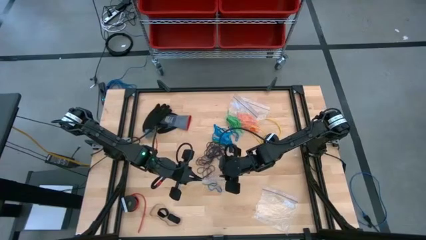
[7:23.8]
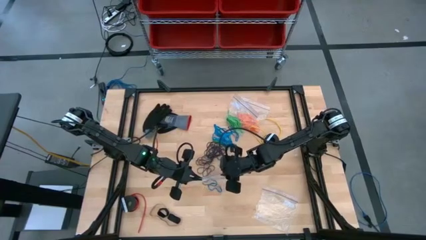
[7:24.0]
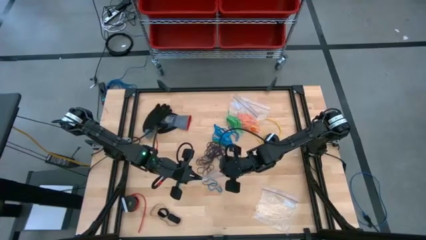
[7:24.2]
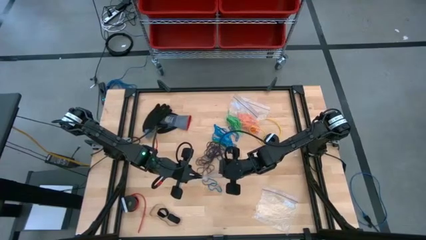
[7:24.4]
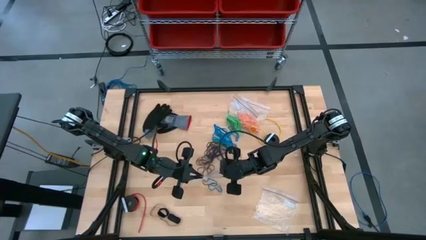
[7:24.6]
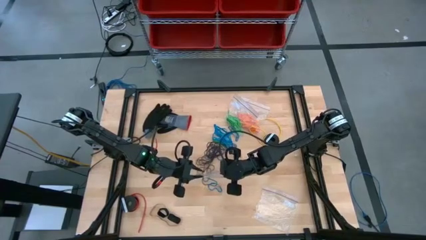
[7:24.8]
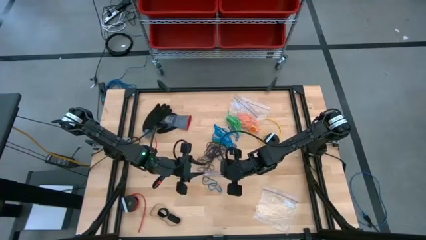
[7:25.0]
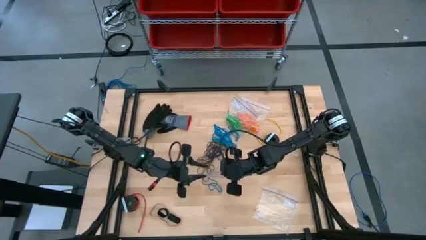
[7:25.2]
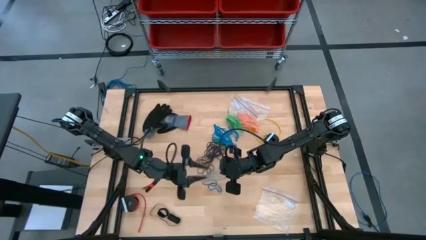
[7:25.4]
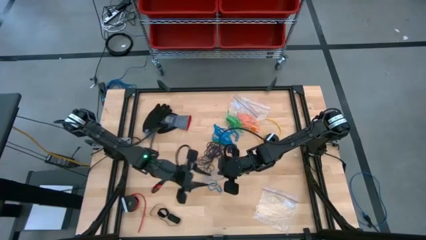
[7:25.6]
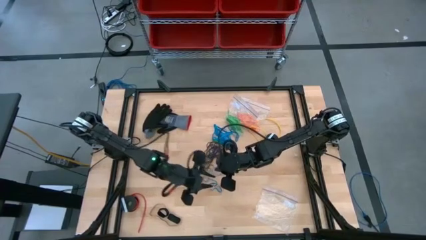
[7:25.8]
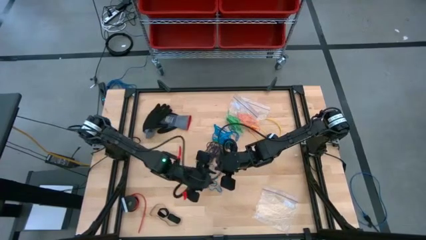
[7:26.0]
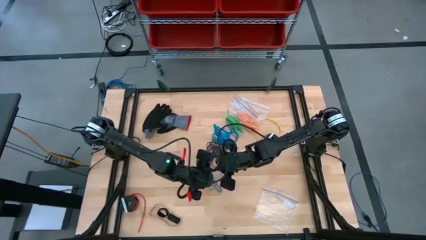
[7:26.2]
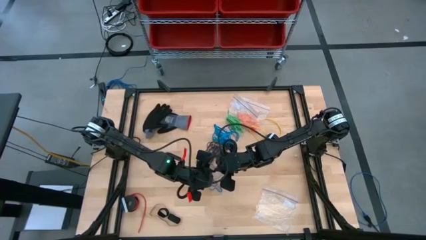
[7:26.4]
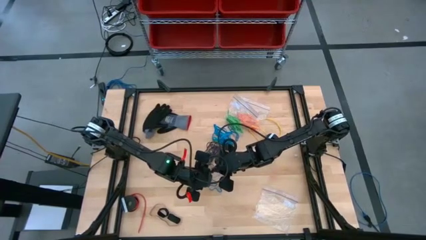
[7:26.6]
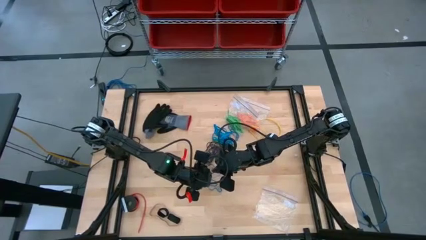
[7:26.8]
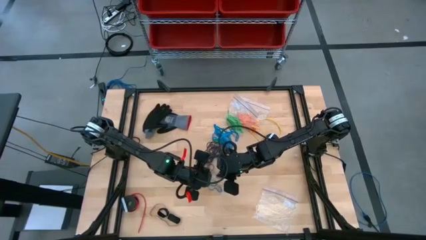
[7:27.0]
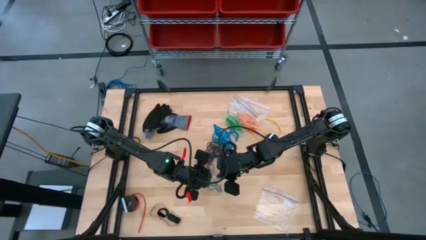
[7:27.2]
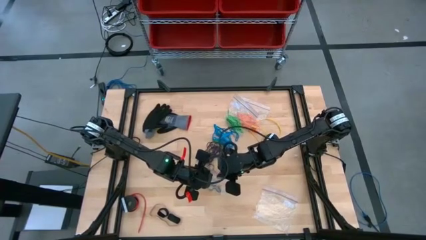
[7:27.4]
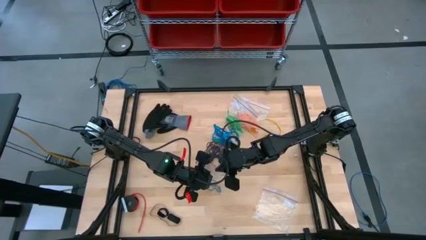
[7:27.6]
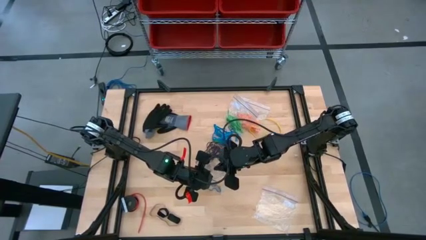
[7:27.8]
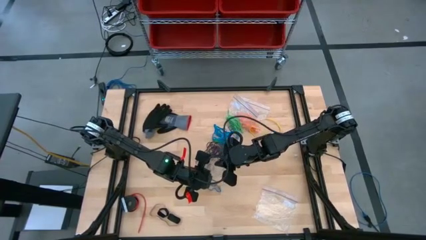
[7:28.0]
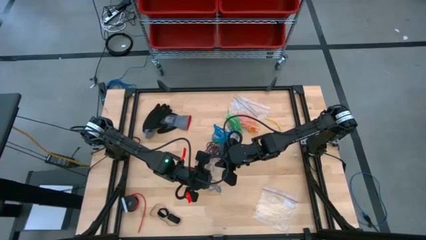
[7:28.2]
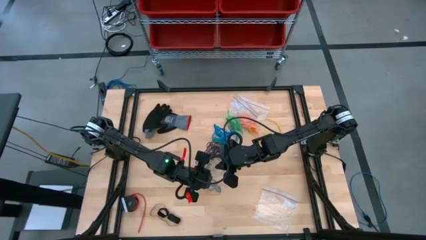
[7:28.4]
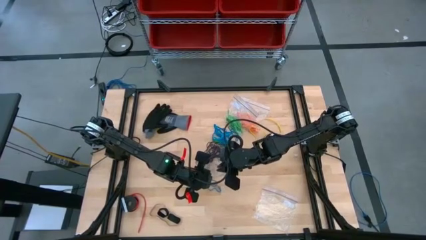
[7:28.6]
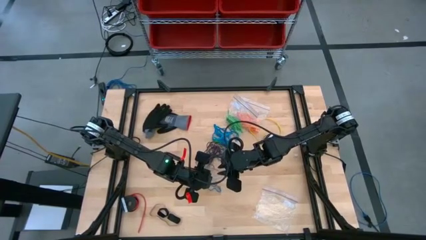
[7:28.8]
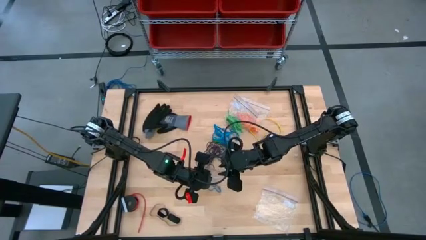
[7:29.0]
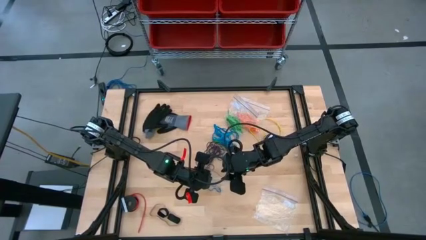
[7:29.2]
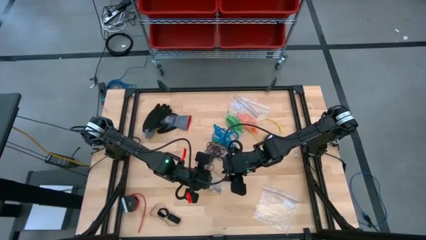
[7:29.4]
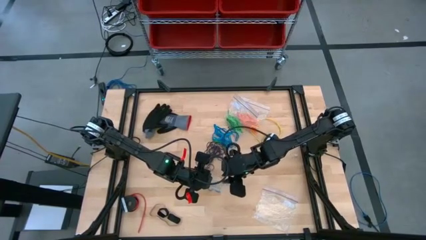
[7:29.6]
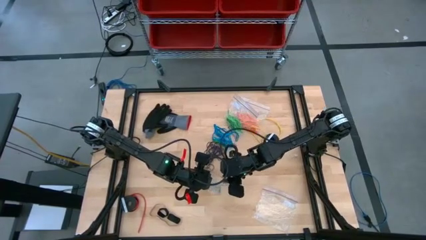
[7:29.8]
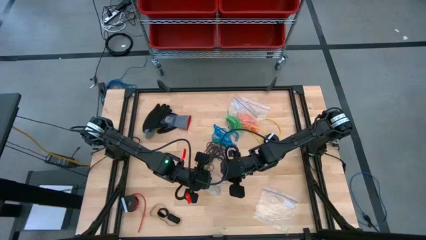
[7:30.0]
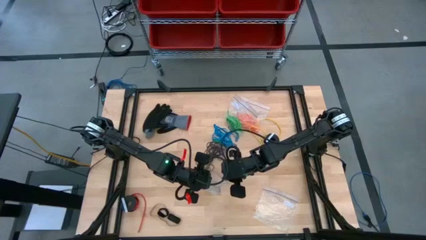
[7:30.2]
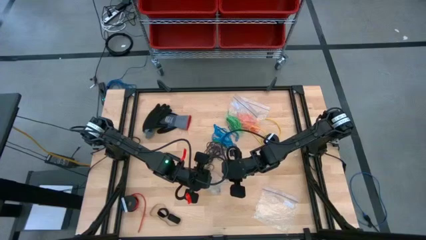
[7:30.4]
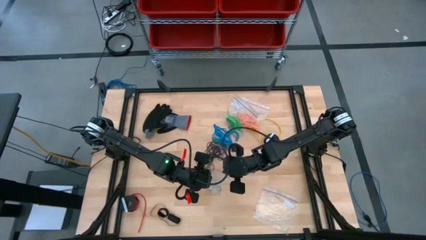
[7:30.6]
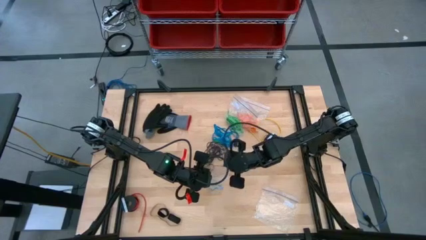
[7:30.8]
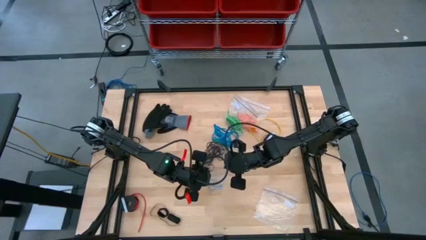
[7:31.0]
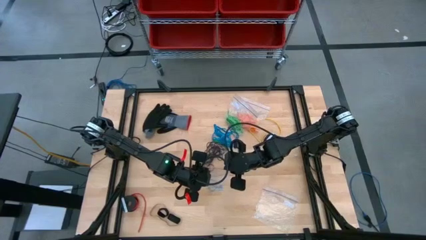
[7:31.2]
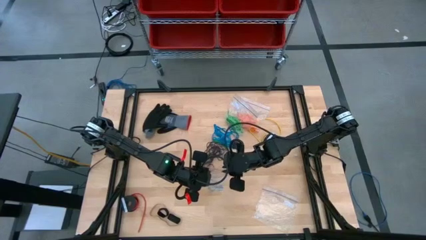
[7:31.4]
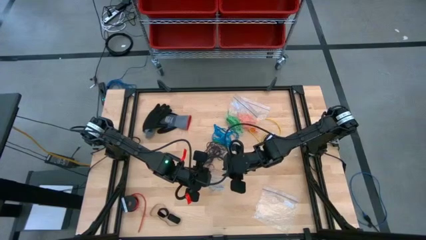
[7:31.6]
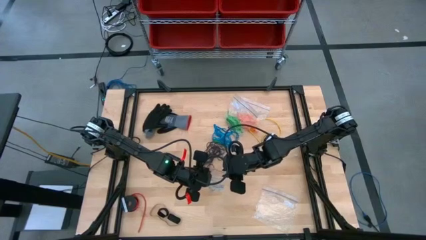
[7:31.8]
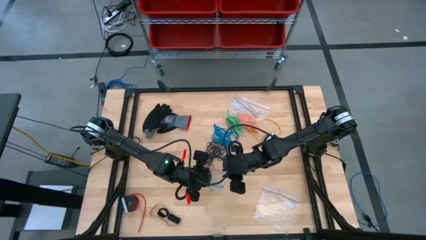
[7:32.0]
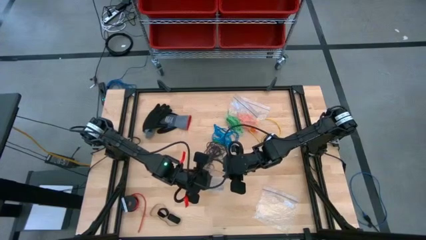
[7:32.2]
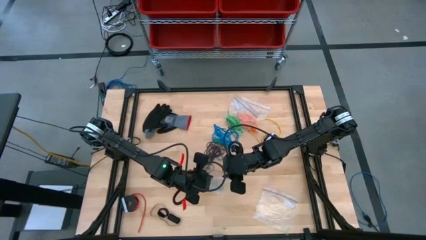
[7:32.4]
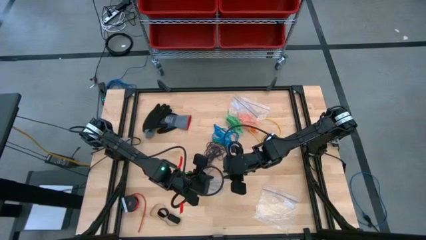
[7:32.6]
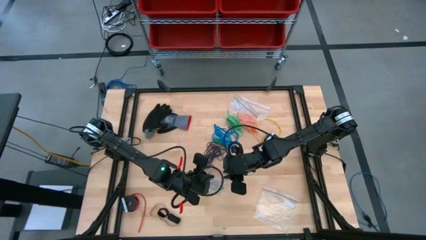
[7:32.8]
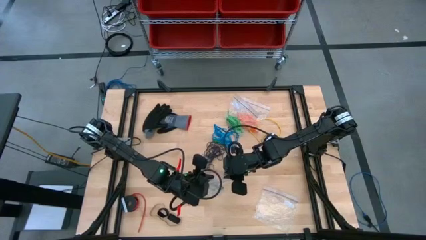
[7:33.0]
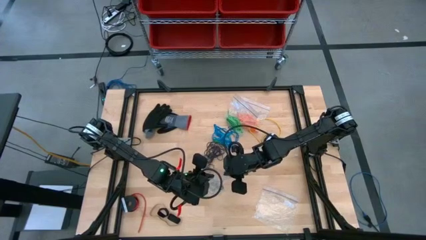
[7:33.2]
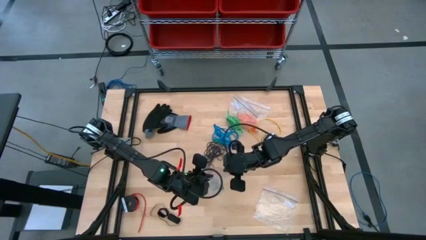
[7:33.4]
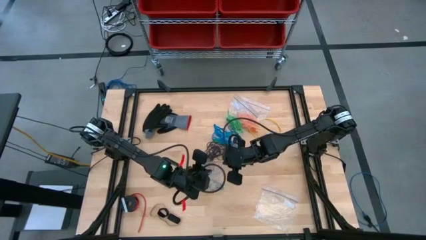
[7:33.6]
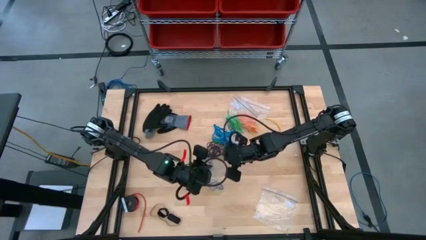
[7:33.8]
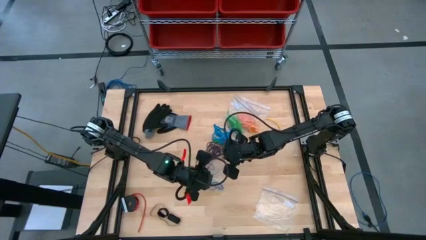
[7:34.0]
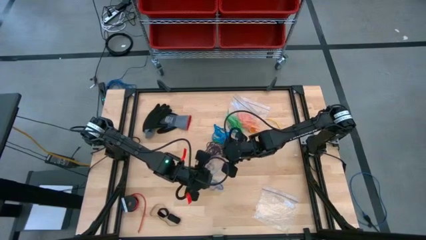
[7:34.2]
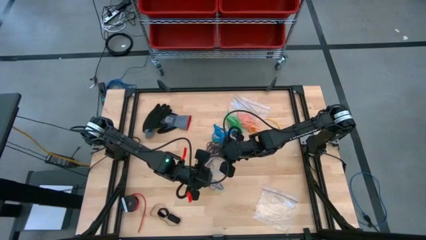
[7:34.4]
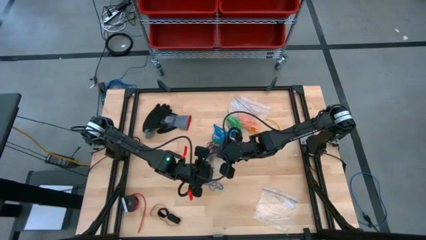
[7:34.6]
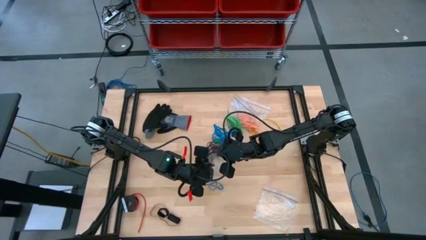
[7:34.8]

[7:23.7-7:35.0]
Task: Sort rubber bands
Open the transparent zip bag

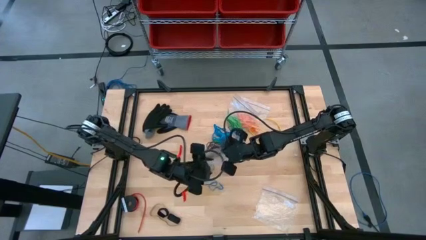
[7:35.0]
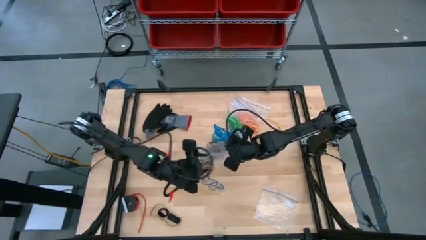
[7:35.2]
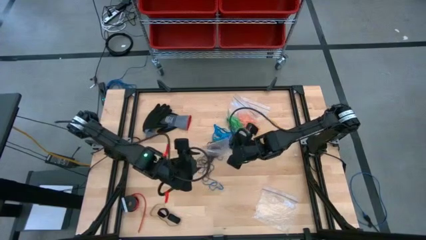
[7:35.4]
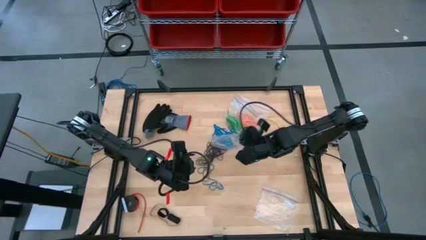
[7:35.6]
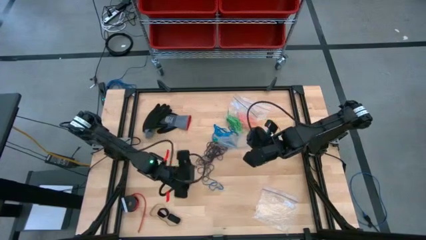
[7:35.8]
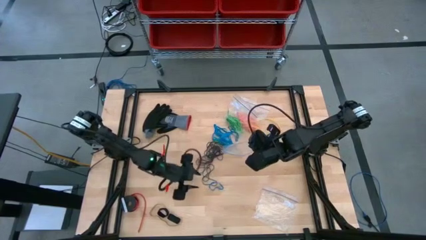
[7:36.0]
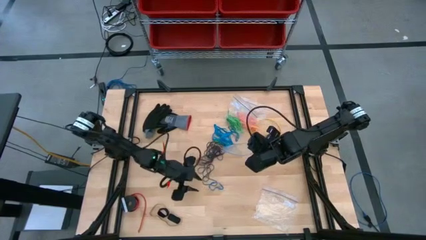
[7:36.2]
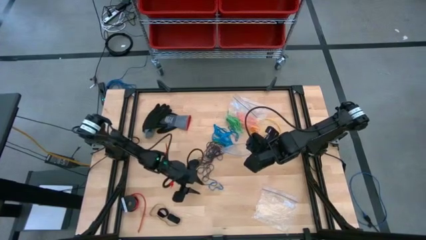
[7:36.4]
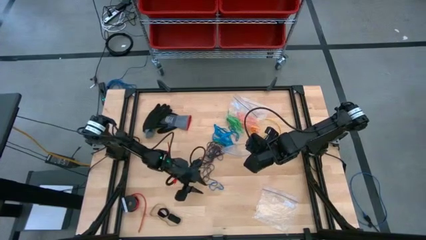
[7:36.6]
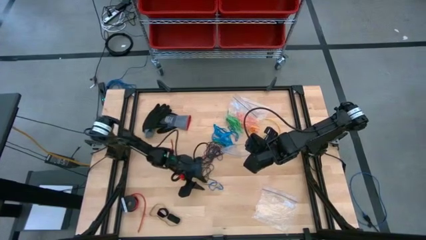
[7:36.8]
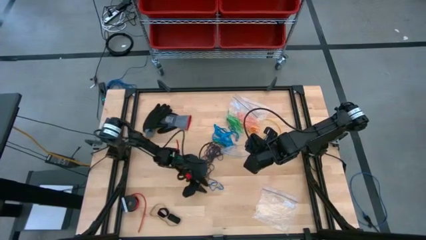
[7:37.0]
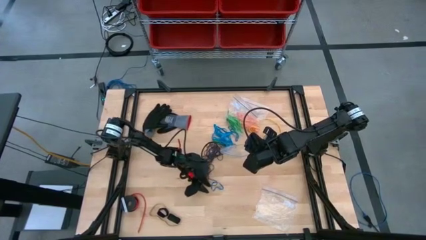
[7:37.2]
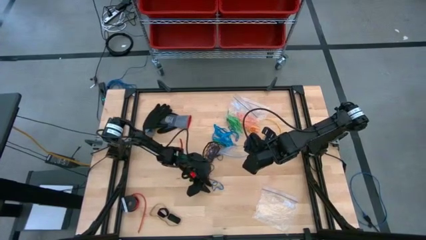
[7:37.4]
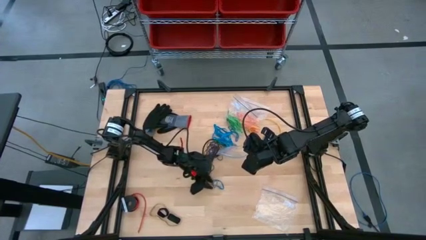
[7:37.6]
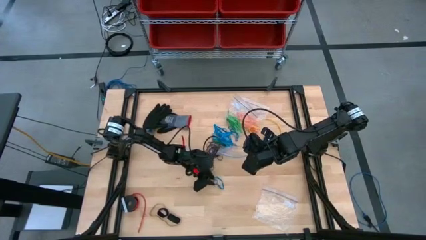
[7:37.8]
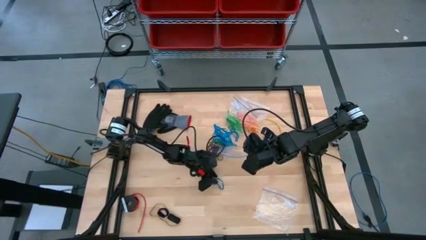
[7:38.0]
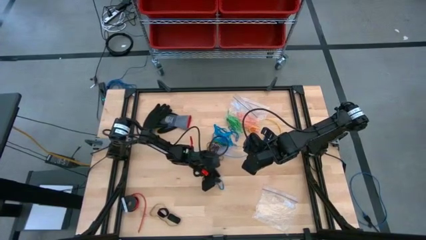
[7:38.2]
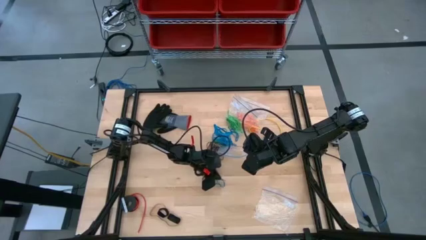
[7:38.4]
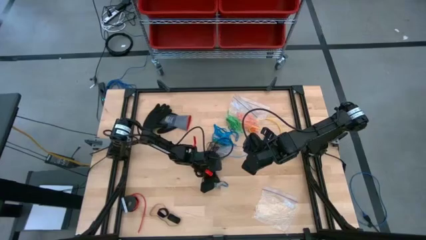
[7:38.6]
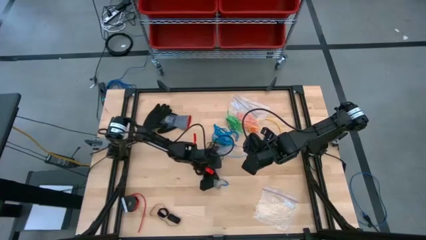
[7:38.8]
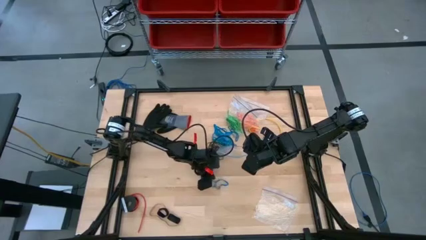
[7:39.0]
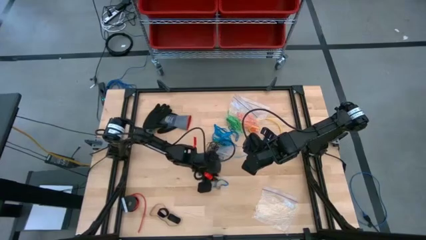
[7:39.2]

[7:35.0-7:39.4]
Put the blue rubber band into the transparent zip bag
